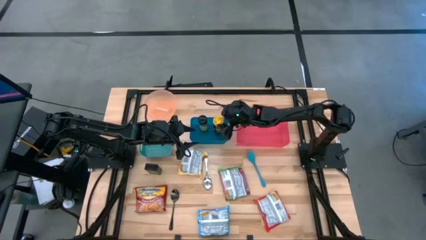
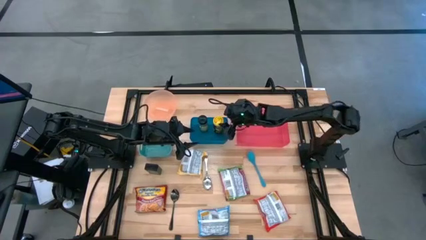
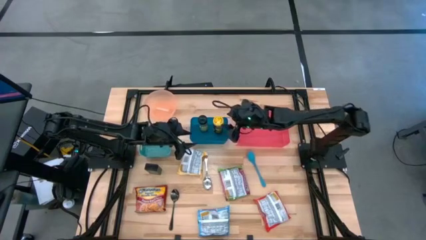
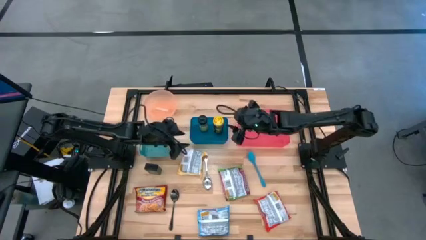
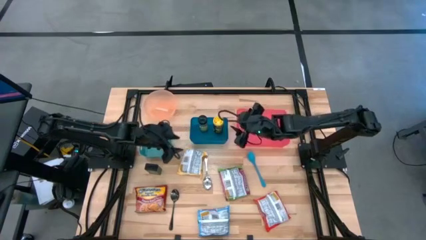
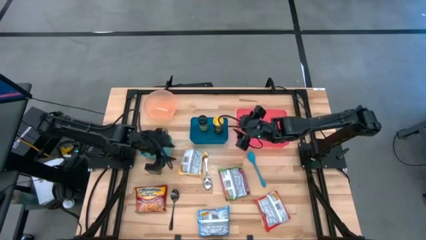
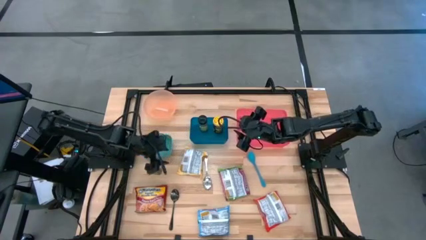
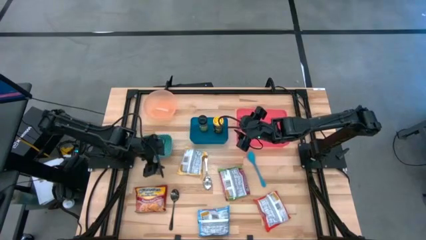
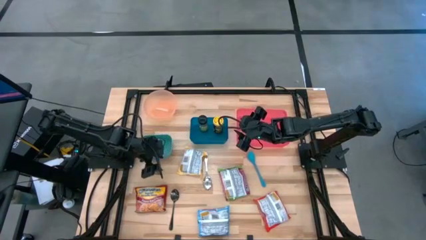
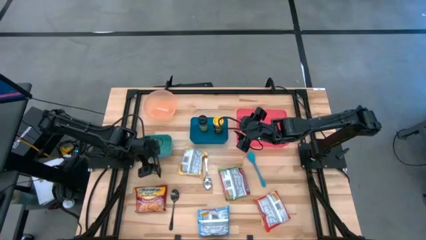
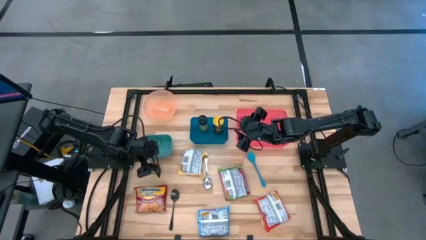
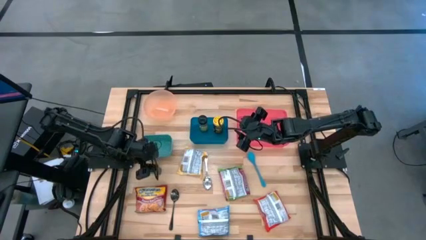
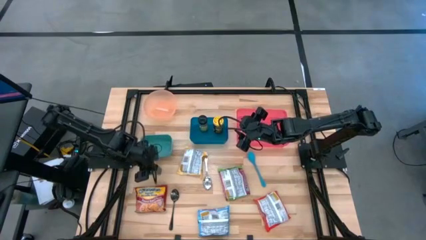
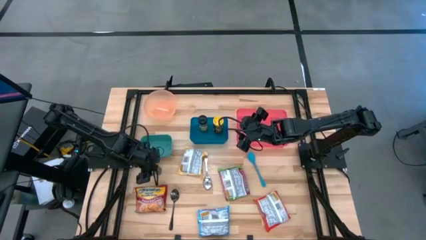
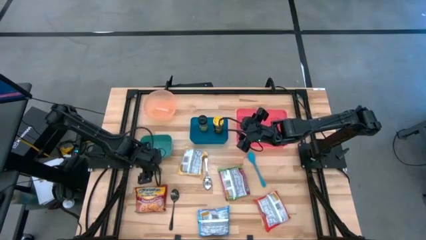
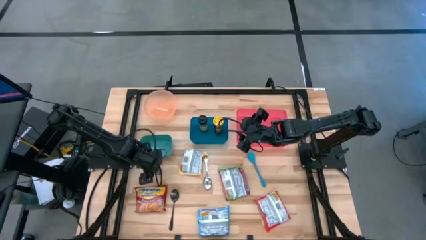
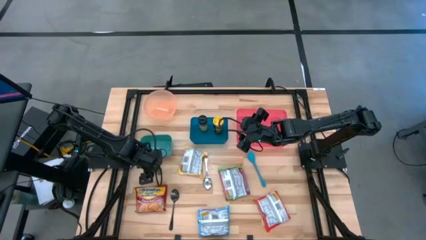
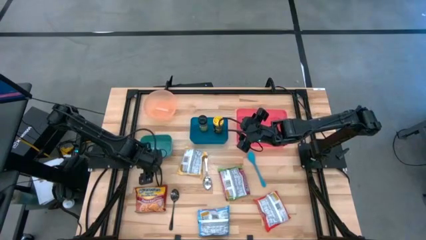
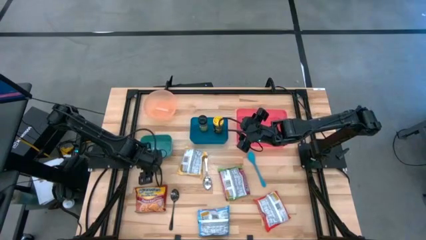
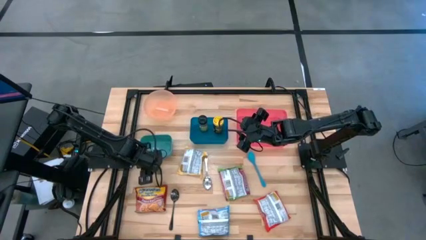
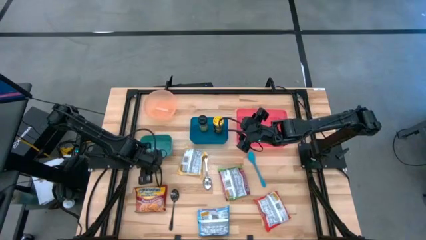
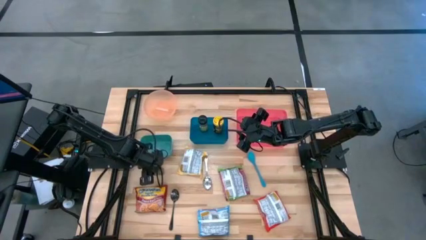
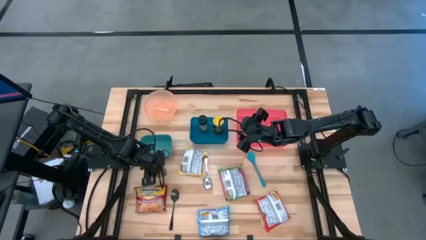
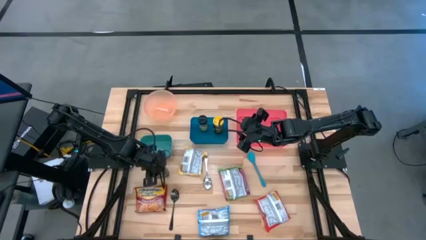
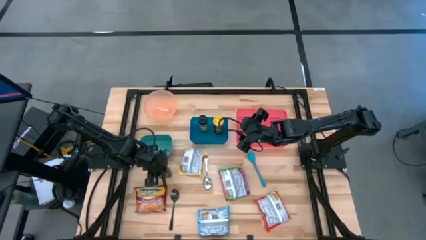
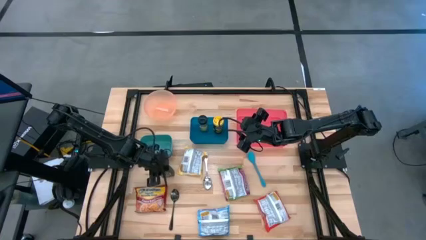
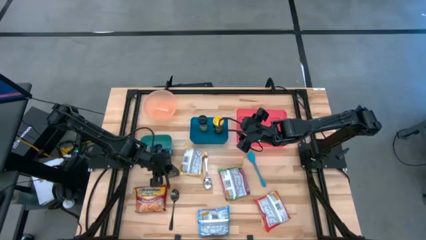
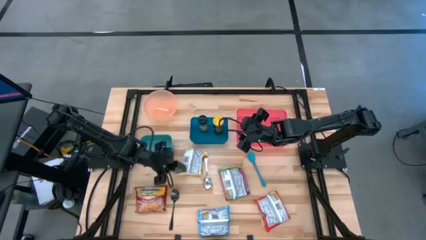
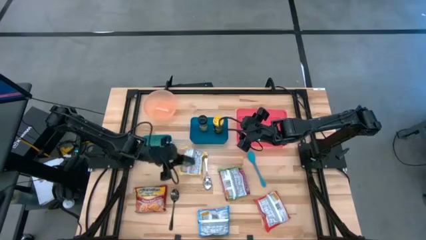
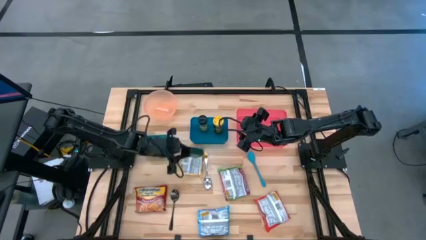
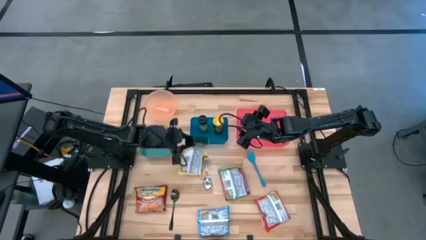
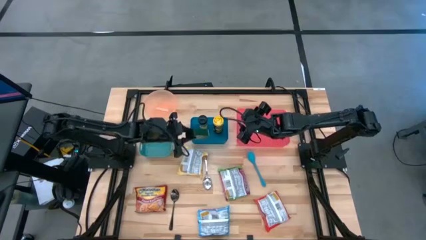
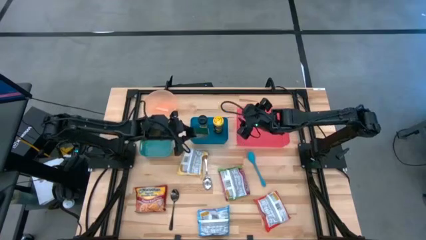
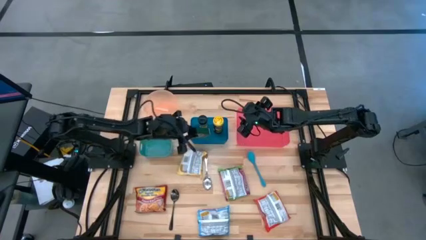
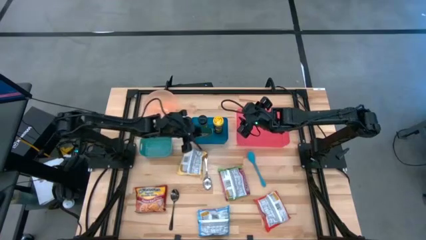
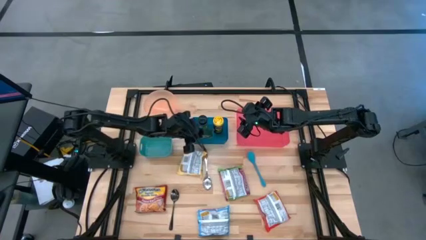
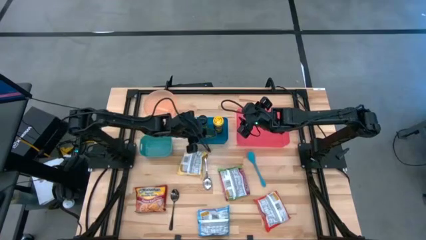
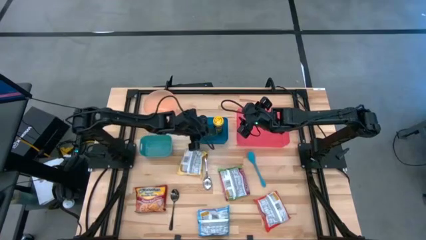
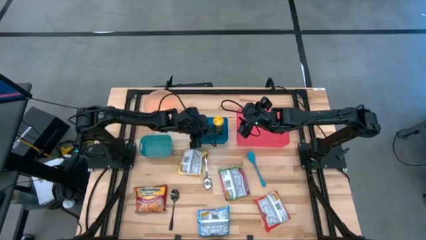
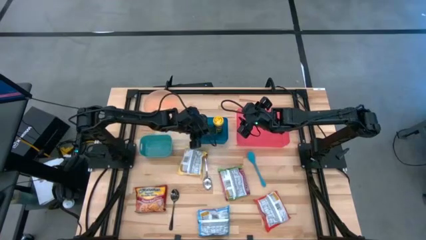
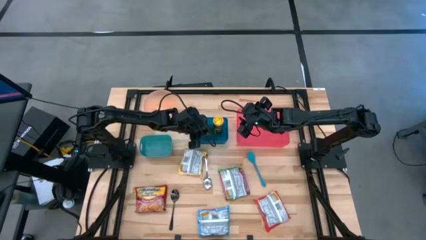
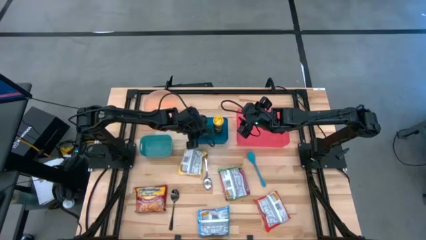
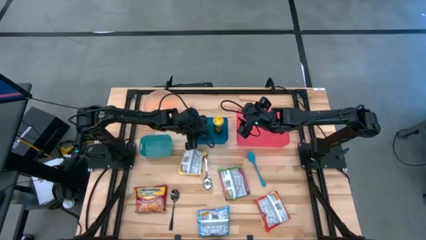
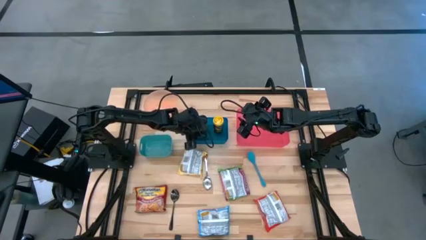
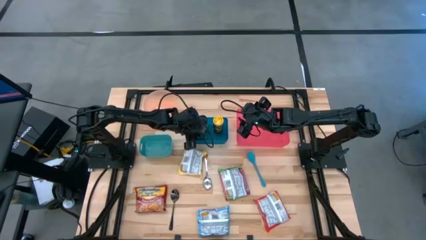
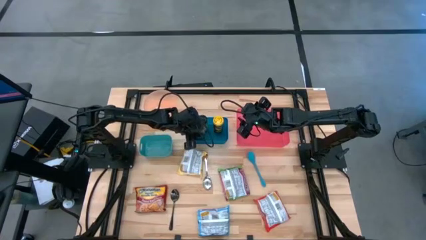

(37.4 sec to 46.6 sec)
Task: Pick & Place Food Item
Put the black seasoning can into the blue bin

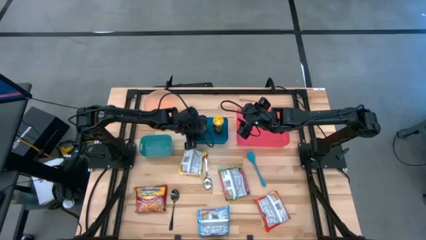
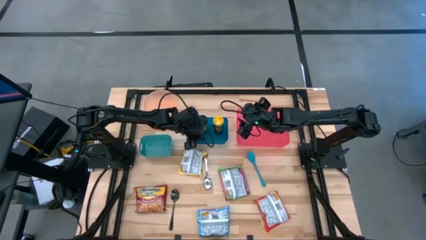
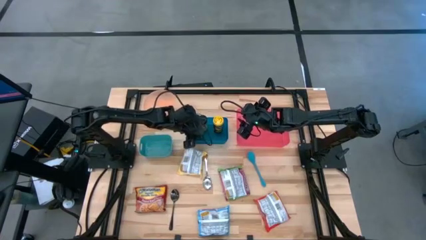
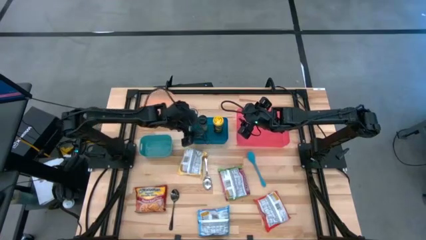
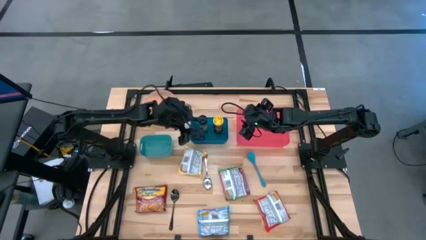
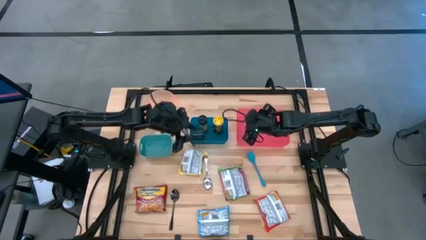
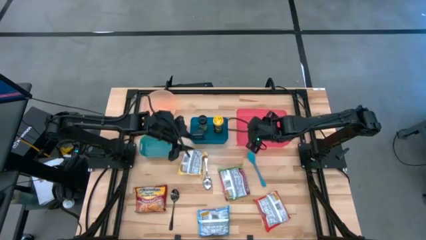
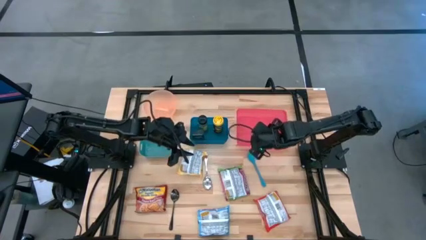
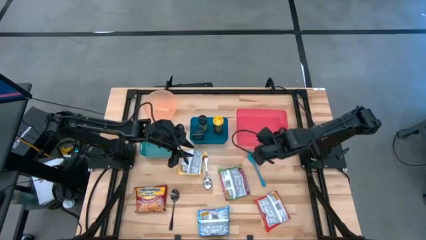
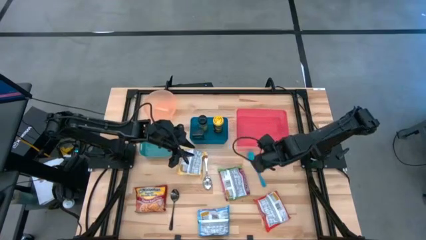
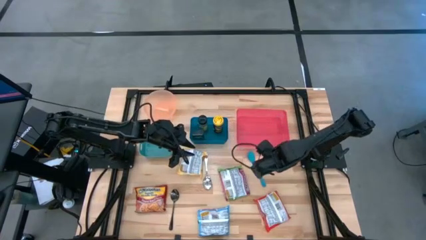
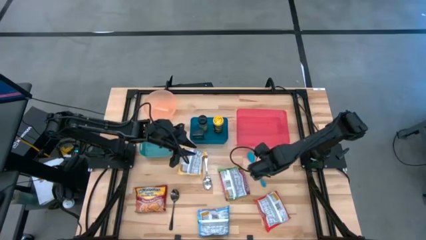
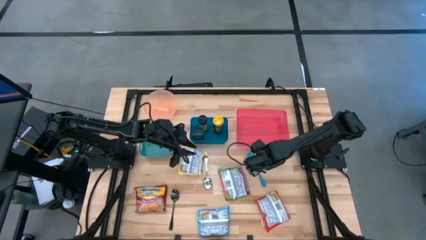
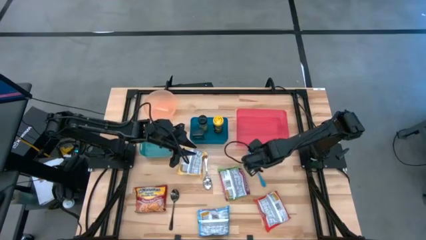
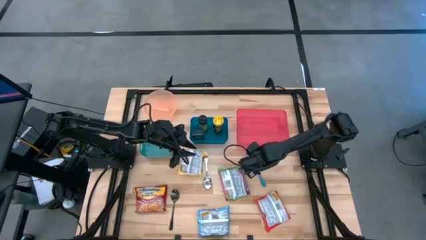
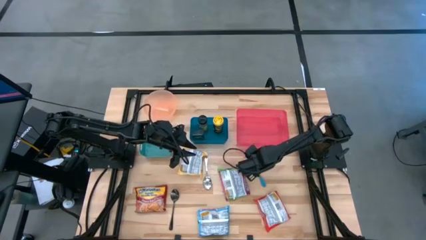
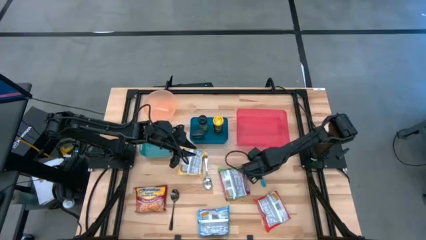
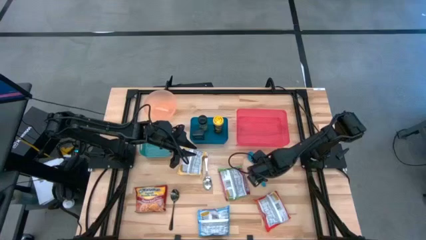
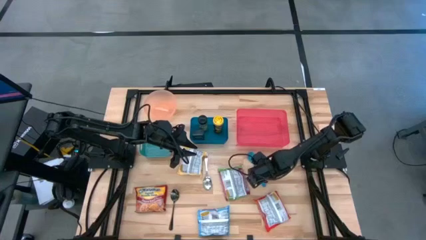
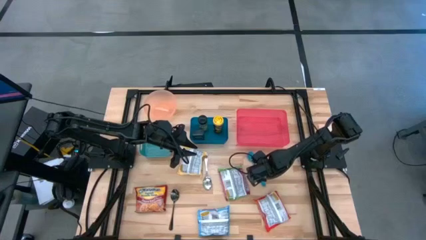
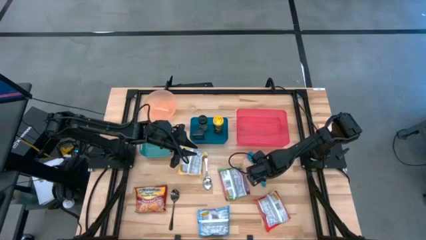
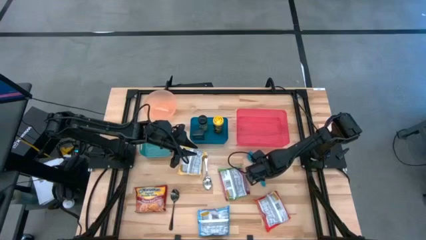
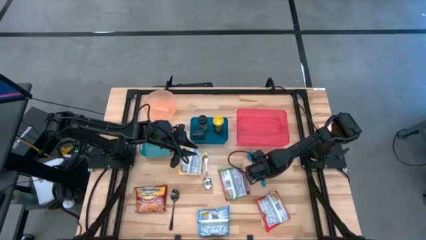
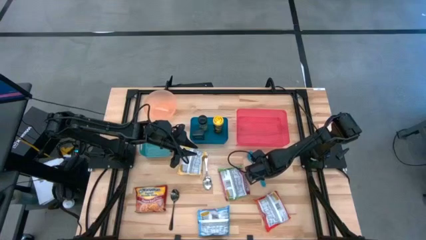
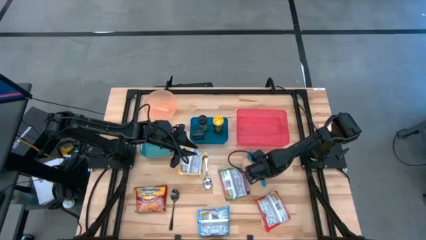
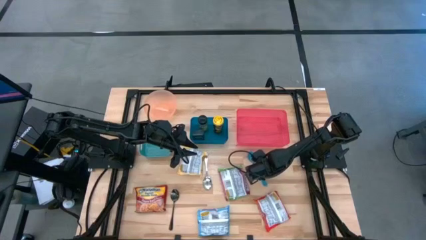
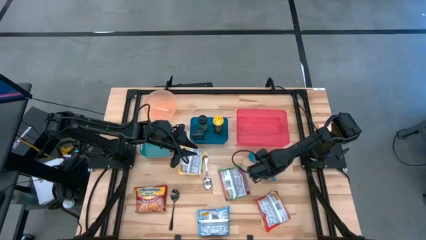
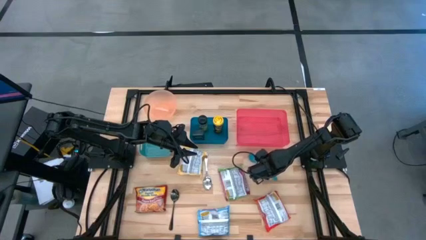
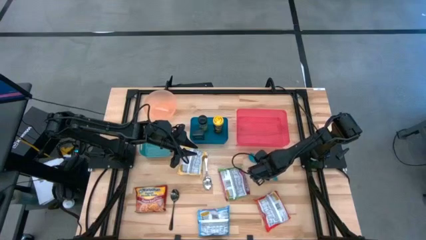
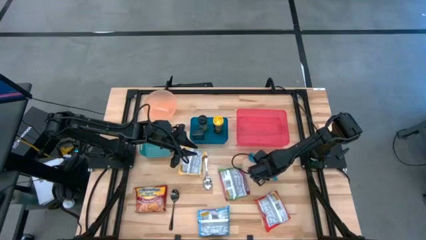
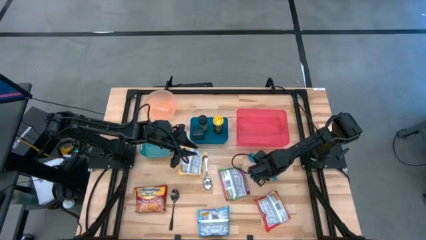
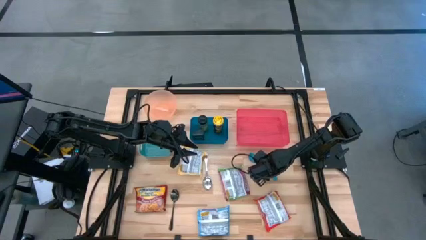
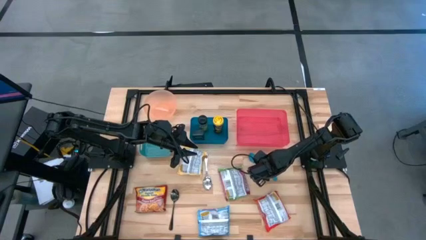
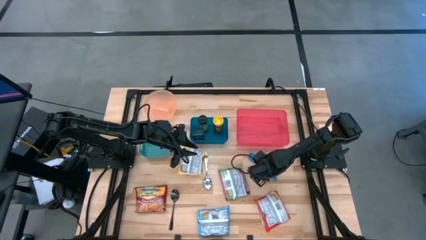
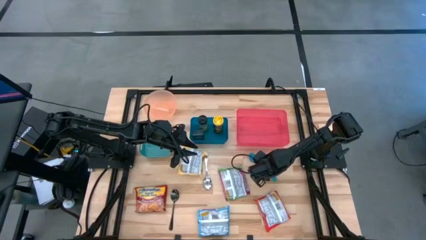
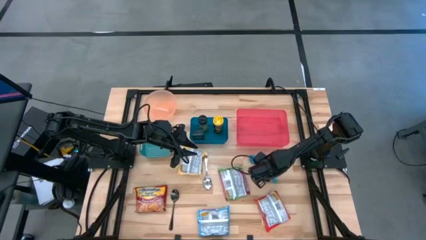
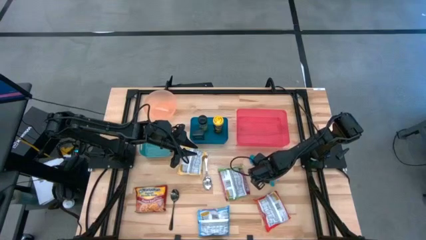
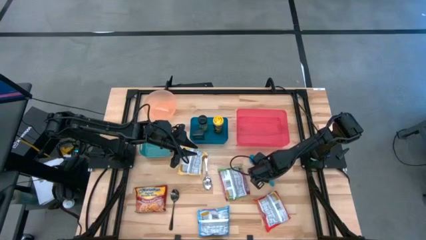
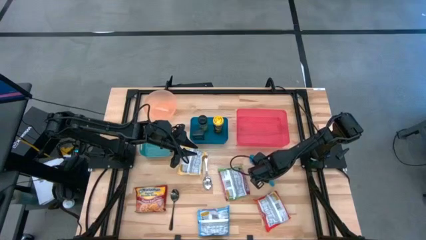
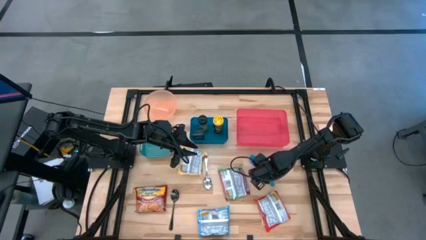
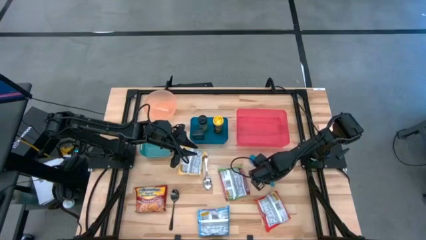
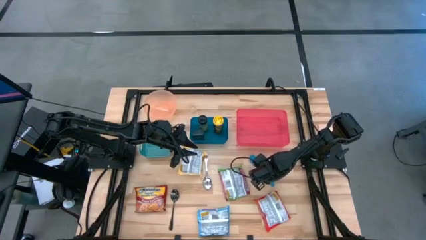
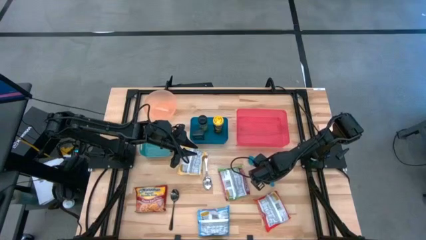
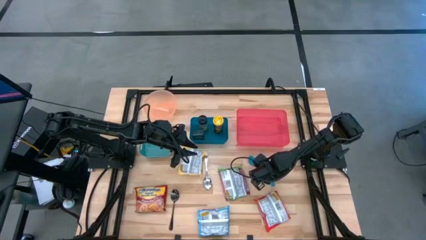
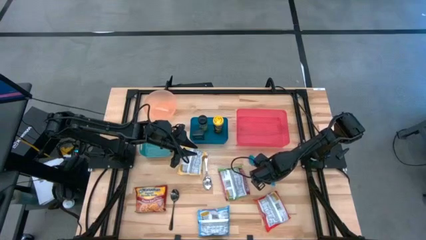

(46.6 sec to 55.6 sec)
Put the blue spoon into the green bin
